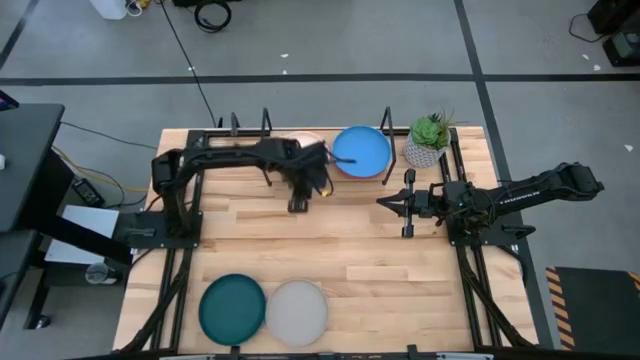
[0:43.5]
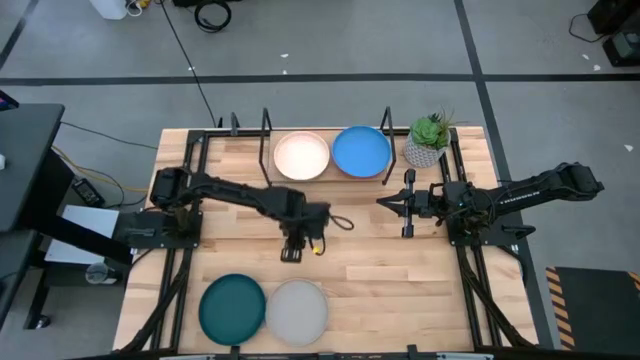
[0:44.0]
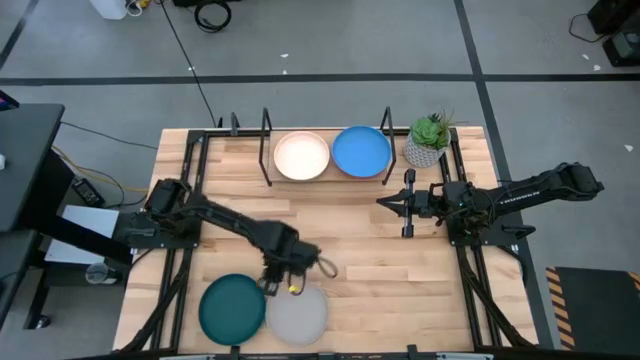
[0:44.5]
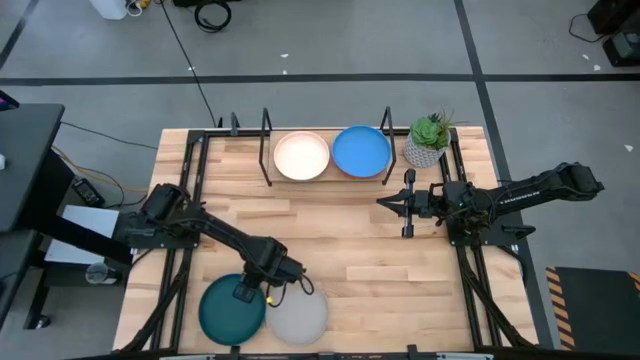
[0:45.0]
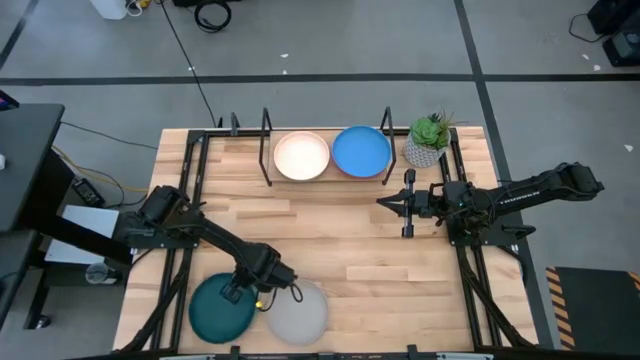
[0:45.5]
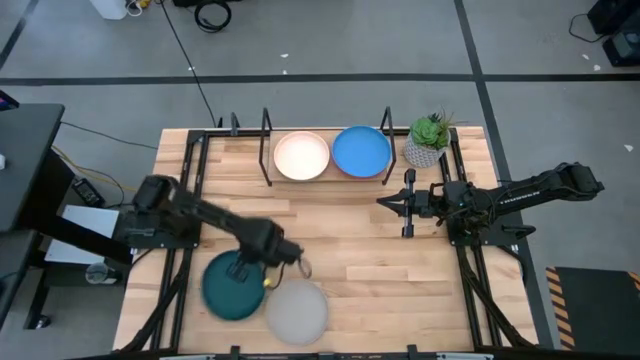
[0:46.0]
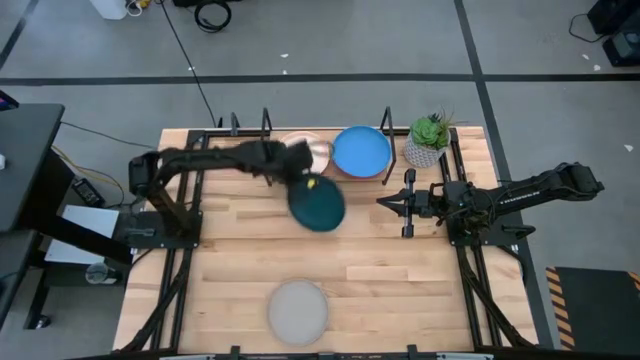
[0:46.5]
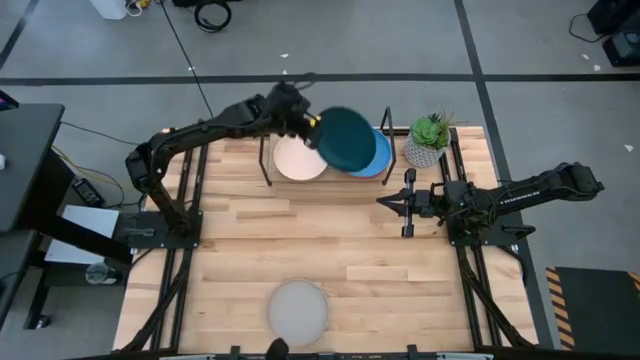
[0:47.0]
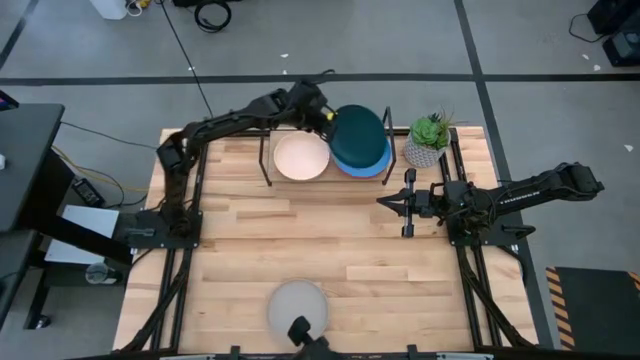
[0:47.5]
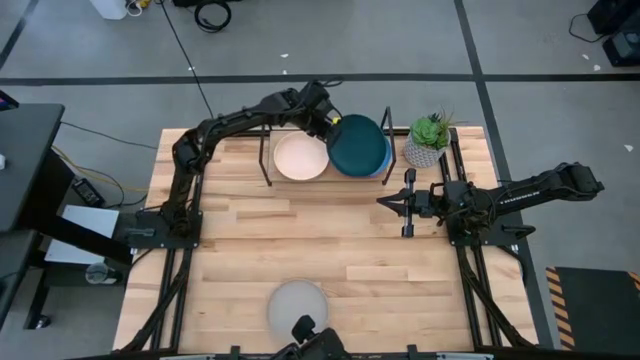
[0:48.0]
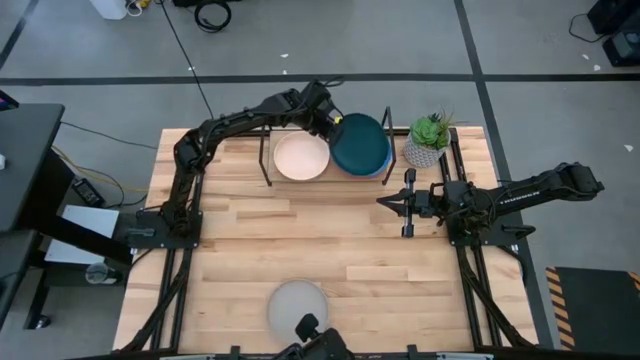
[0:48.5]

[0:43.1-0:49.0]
Task: Place and stack plates onto a shelf
Stack the dark green plate on top of the blue plate on the shelf

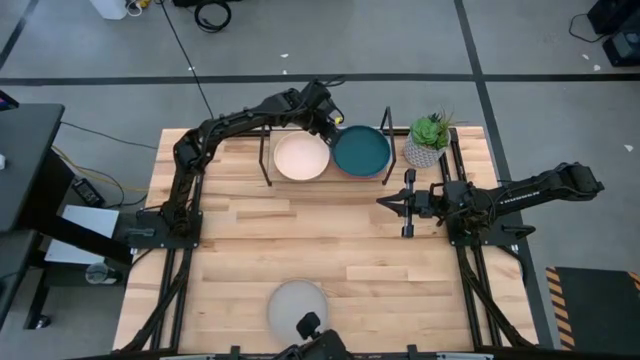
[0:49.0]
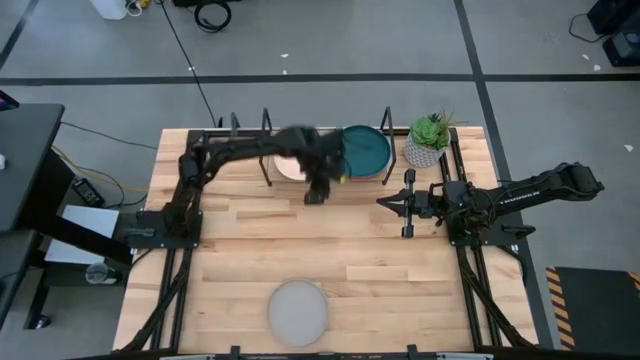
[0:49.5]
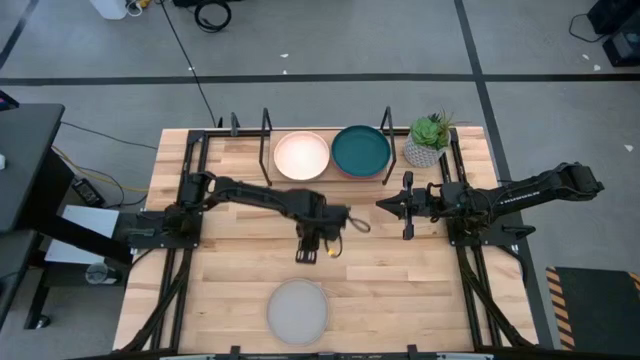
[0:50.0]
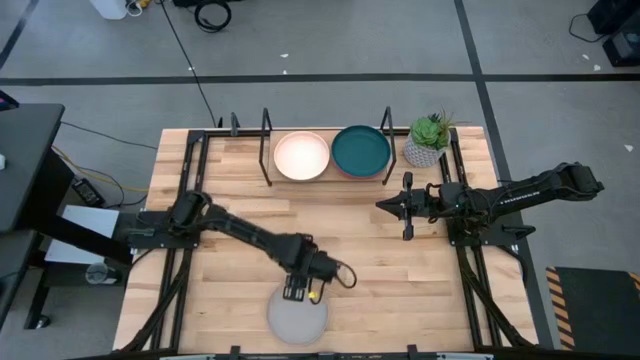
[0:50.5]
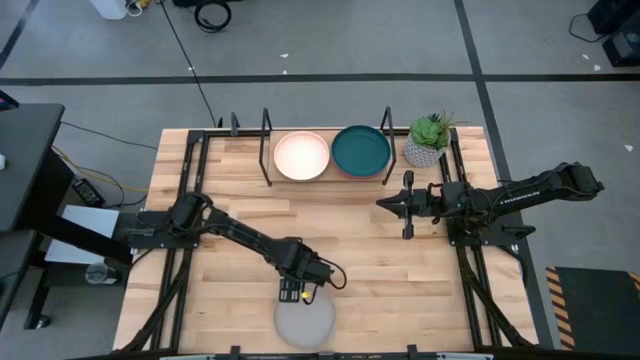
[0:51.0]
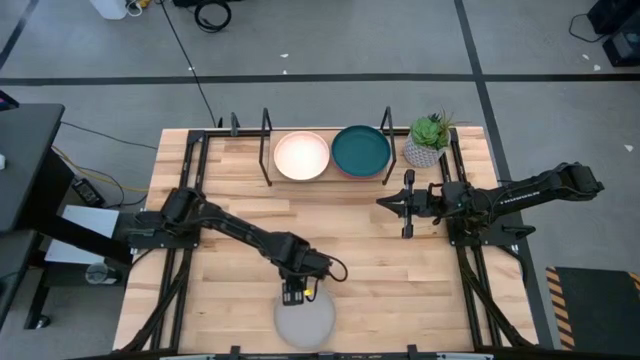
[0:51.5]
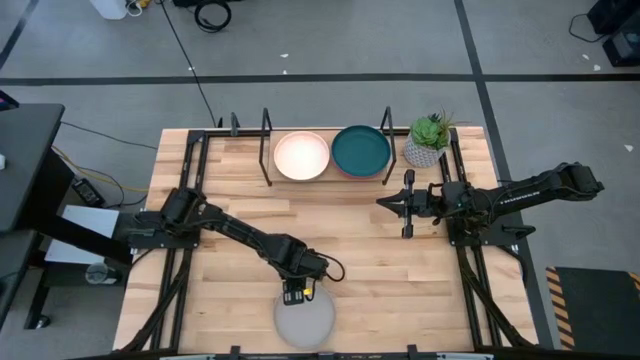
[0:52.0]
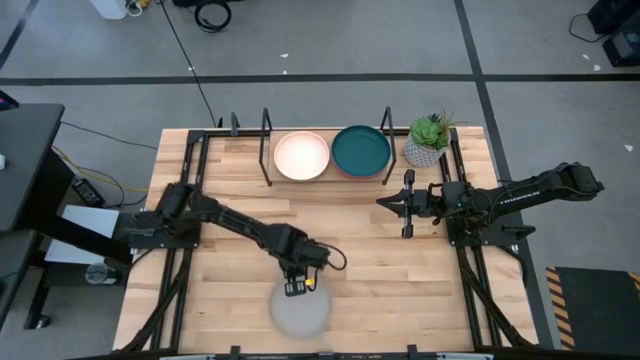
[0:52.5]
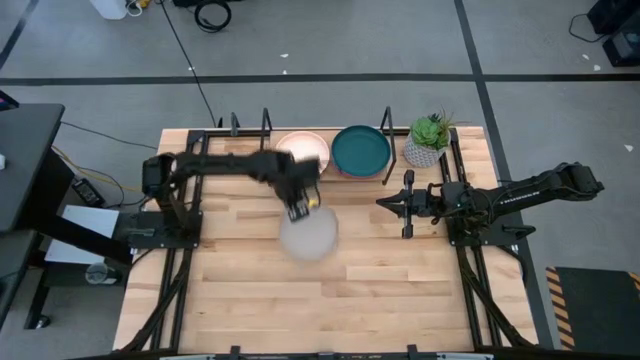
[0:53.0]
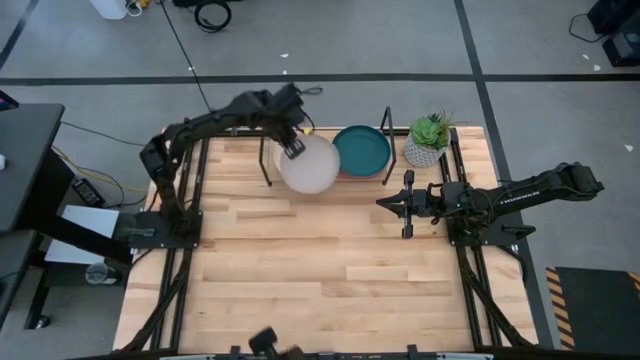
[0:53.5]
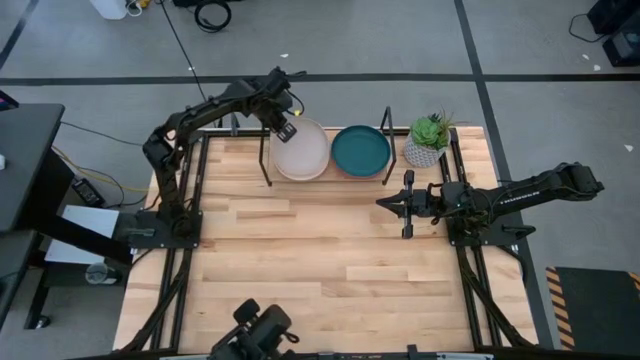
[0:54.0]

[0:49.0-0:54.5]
Stack the gray plate on top of the light pink plate on the shelf

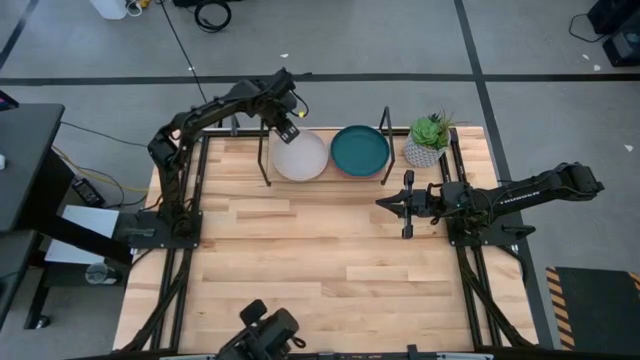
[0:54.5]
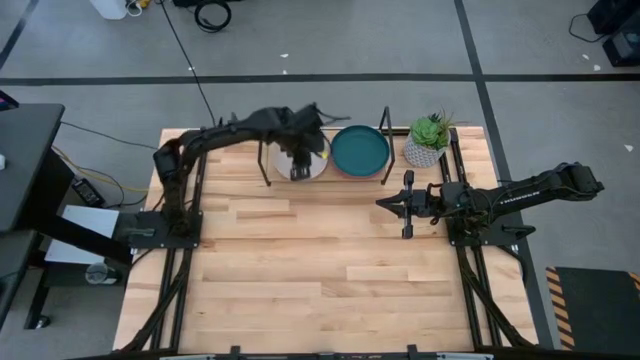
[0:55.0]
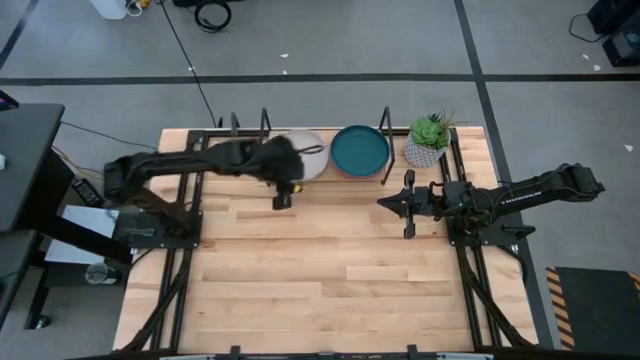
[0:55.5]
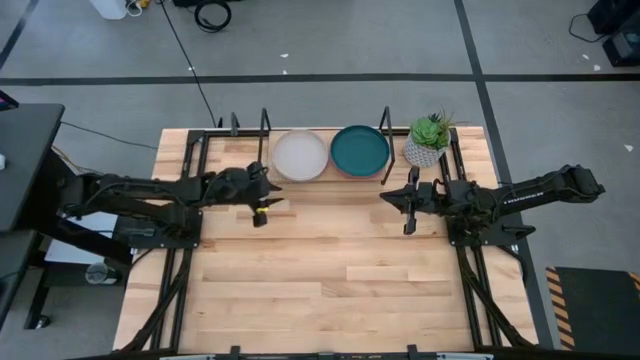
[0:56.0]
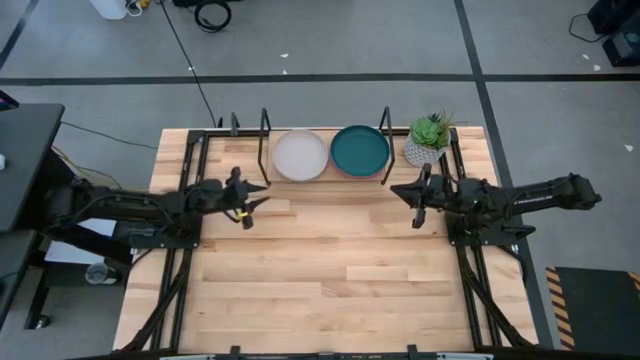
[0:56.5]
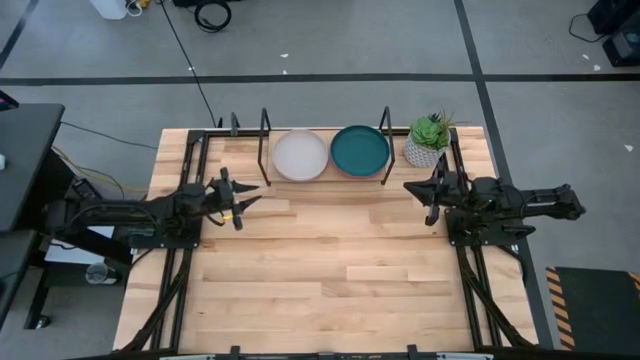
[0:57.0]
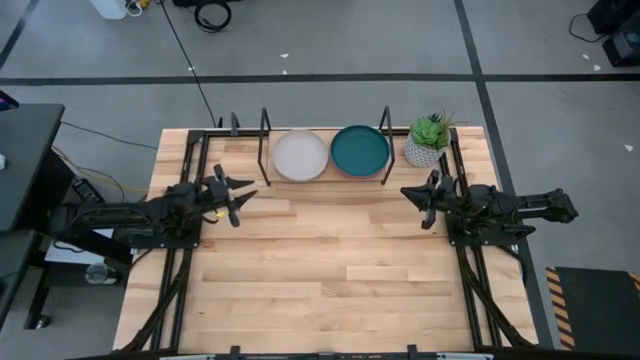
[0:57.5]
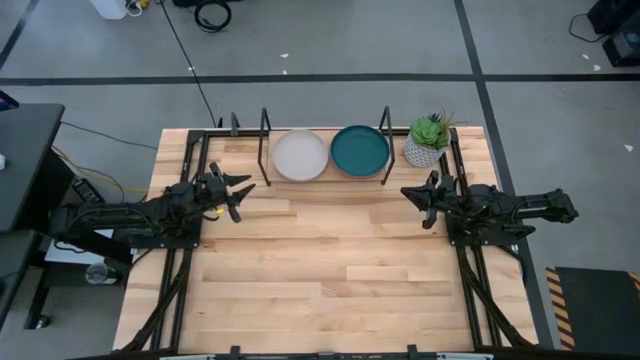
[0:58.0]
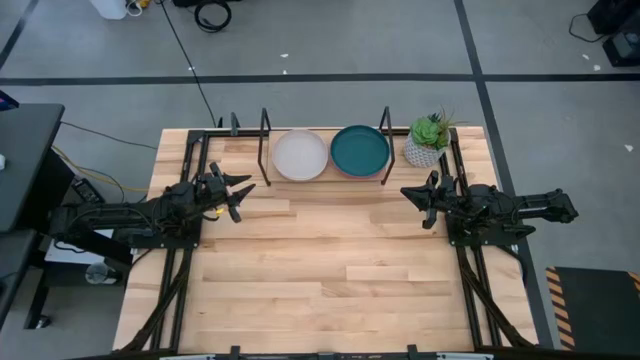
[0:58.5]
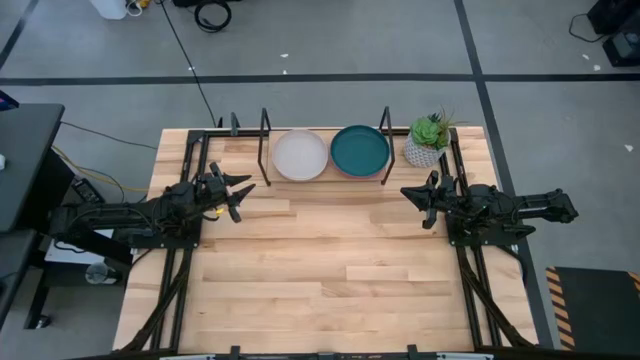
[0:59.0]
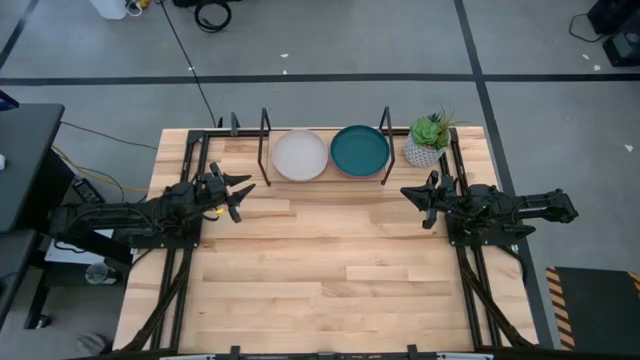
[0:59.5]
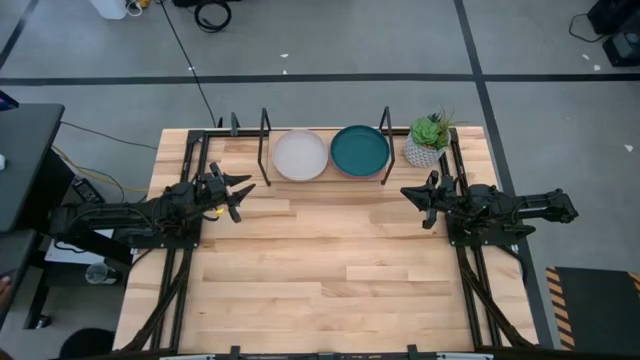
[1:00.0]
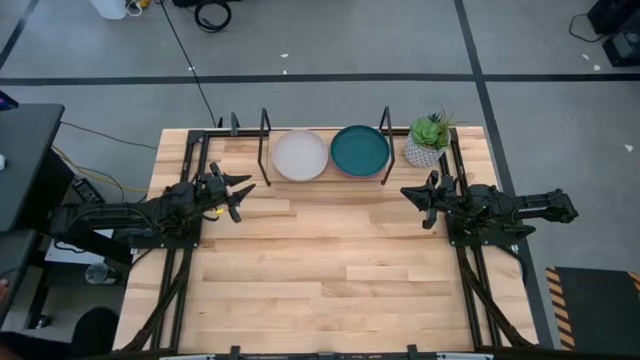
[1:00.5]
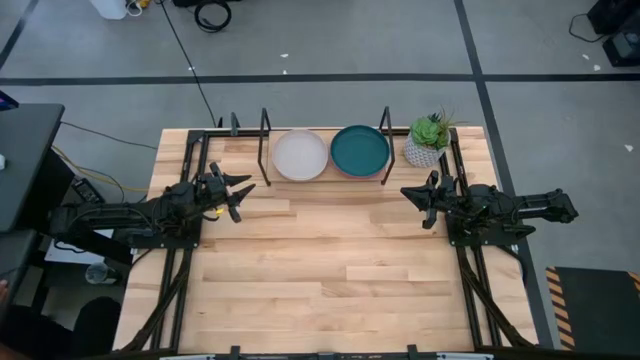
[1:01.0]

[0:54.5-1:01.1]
Return to Home Position

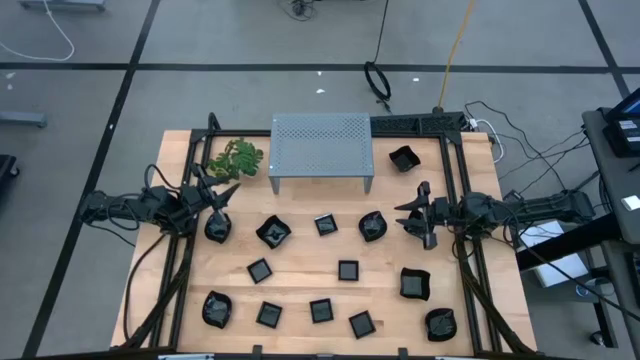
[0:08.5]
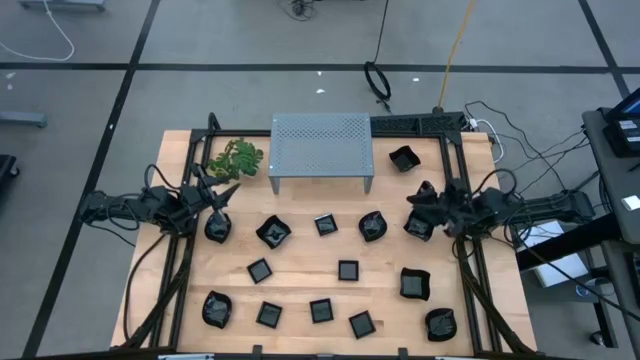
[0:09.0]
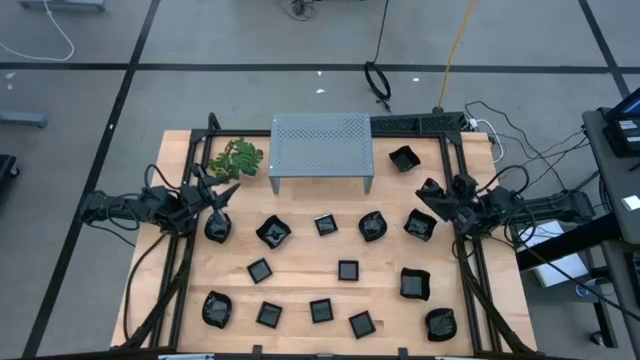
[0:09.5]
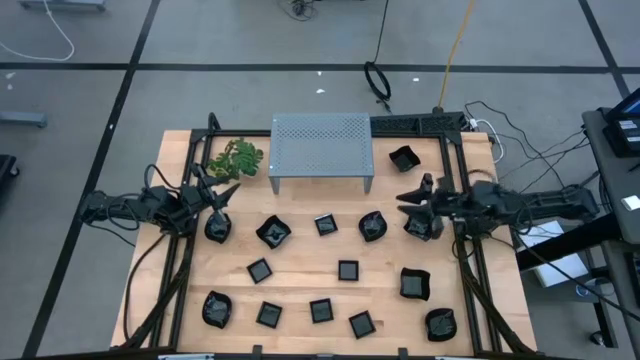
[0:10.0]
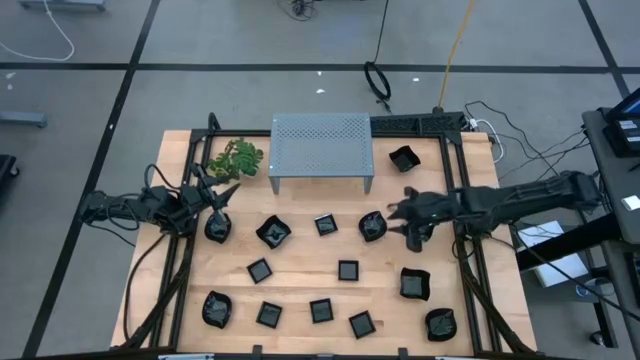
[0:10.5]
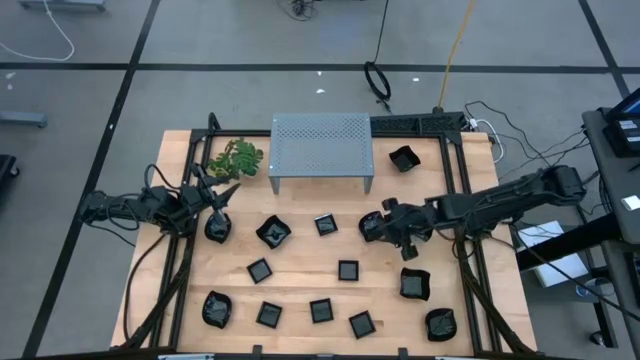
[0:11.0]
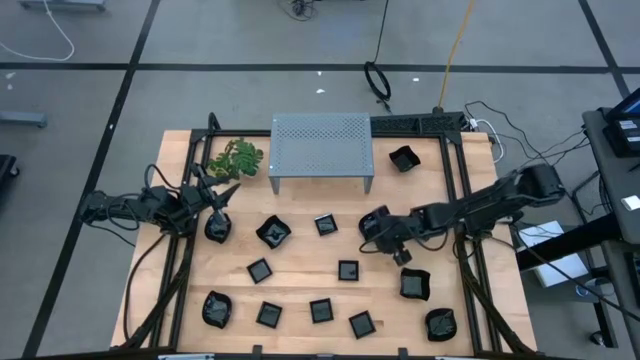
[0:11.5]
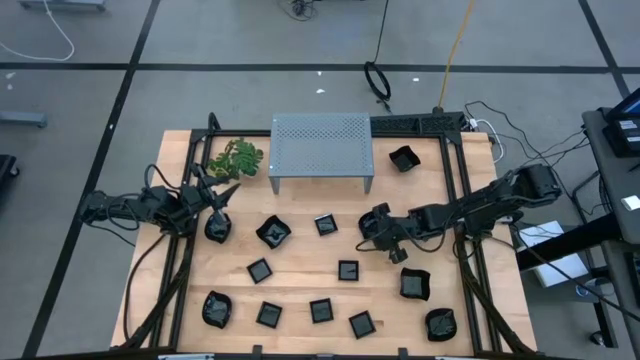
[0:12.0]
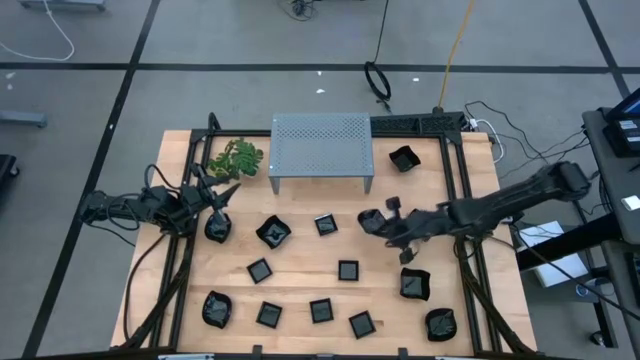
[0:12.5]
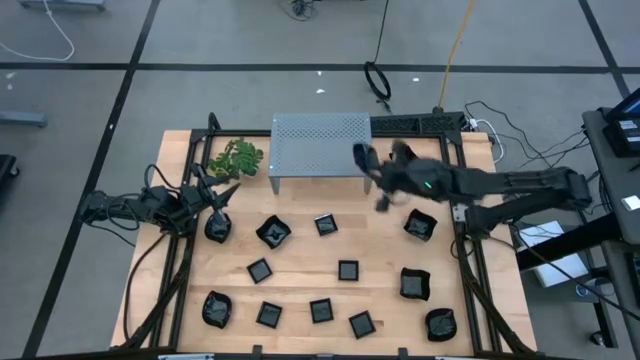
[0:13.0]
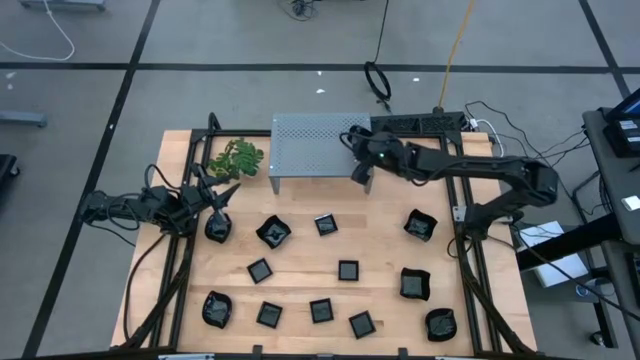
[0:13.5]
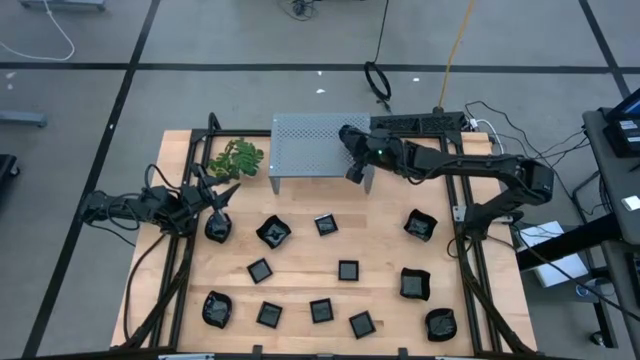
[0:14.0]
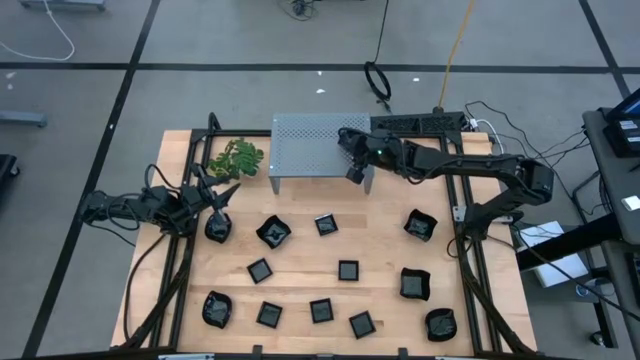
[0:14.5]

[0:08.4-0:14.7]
Task: Pick & Place Mini shaped plates
Put the black leaf-shaped plate on the shelf
